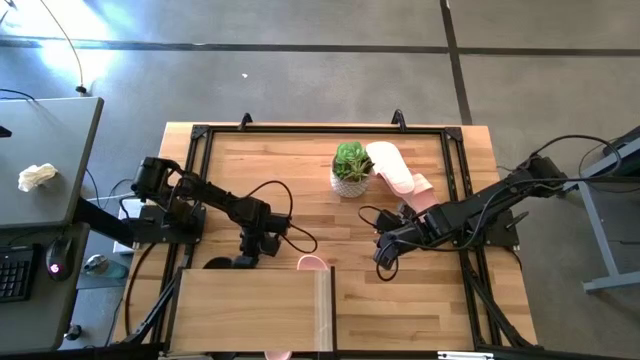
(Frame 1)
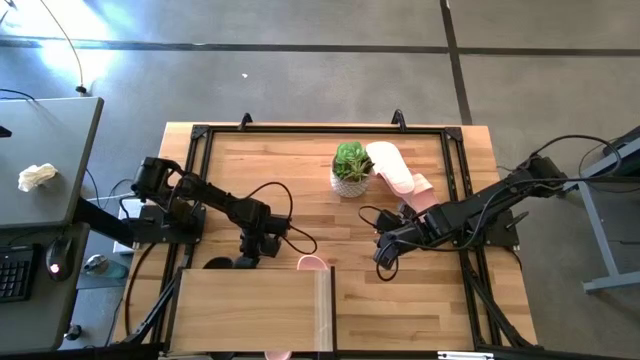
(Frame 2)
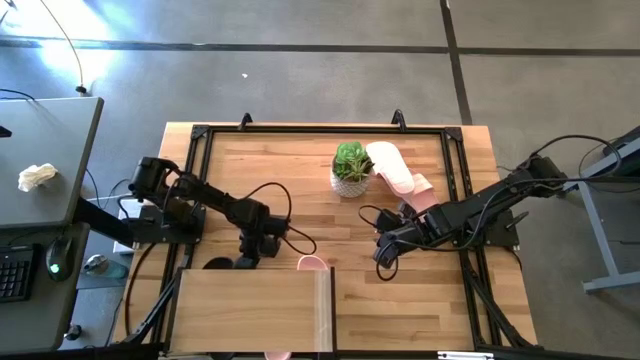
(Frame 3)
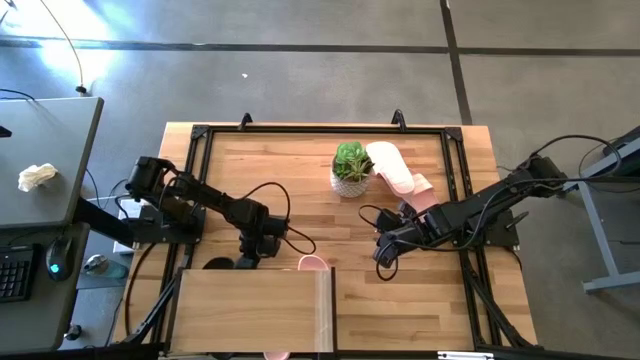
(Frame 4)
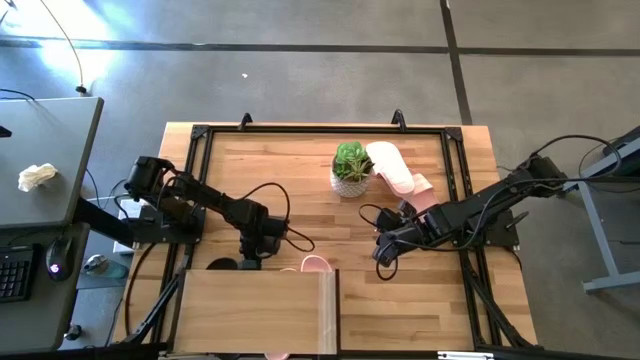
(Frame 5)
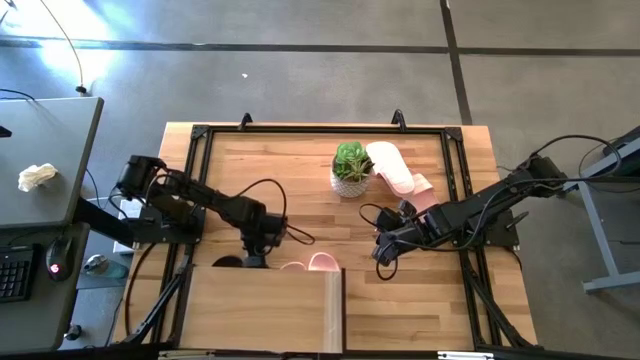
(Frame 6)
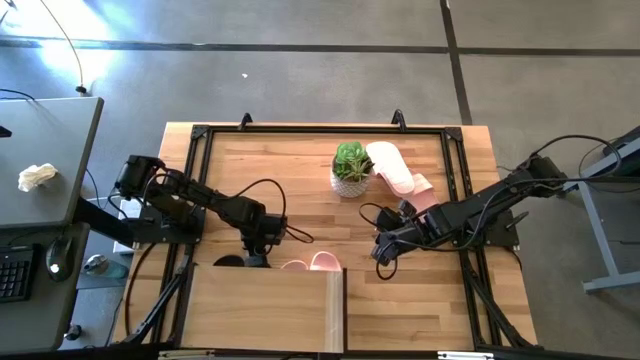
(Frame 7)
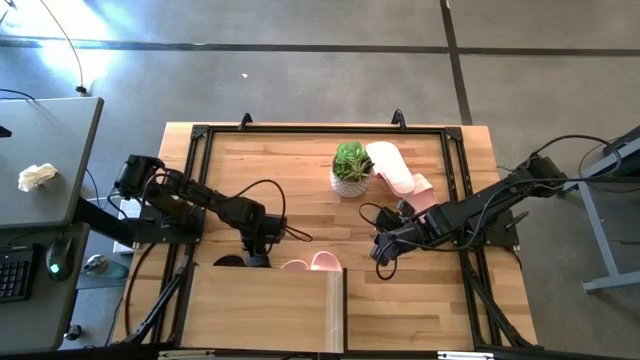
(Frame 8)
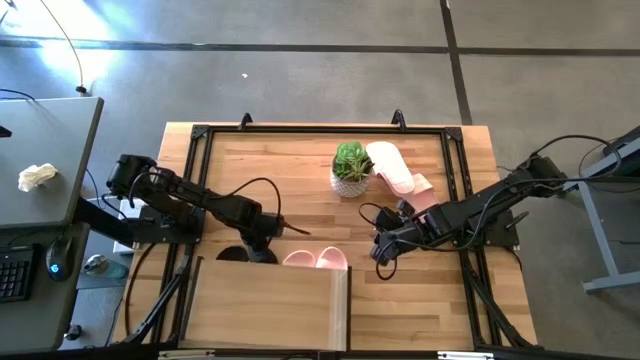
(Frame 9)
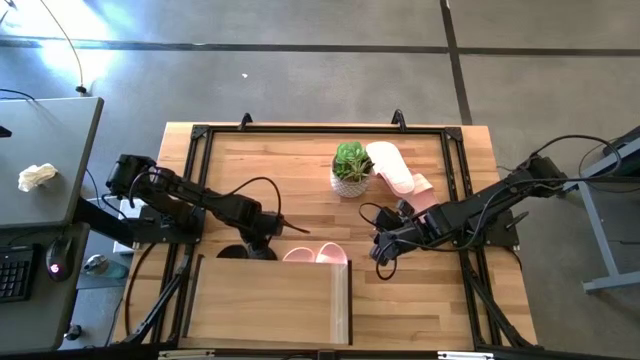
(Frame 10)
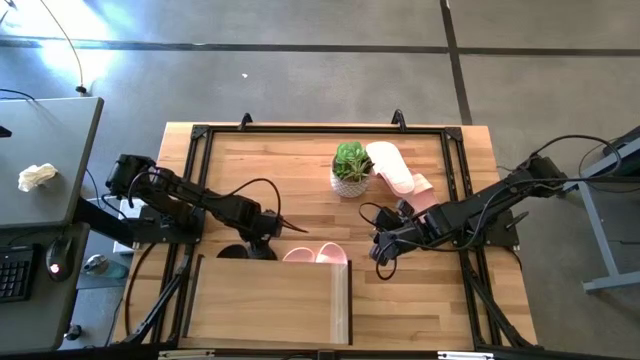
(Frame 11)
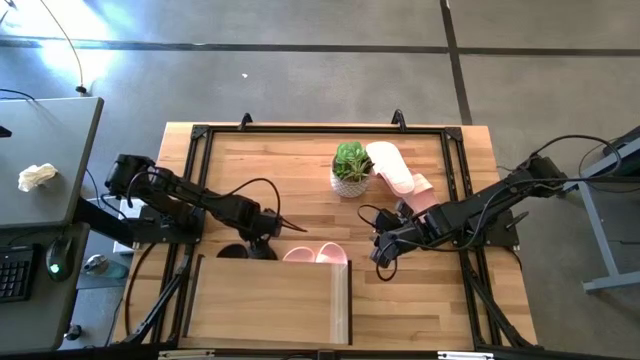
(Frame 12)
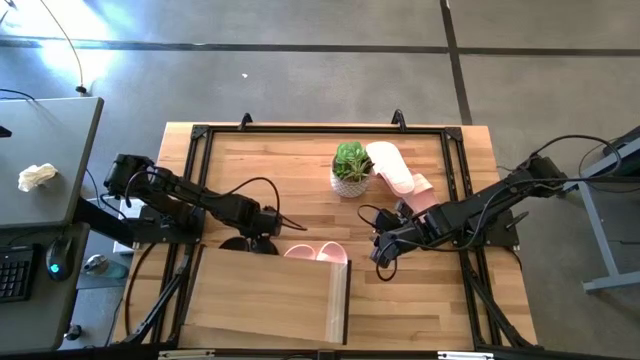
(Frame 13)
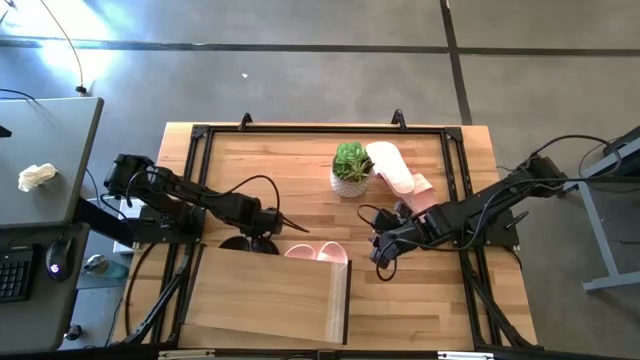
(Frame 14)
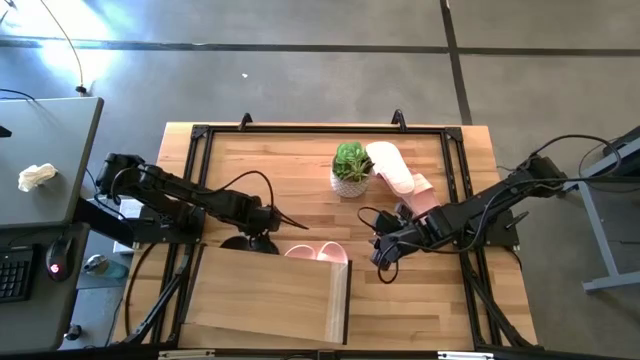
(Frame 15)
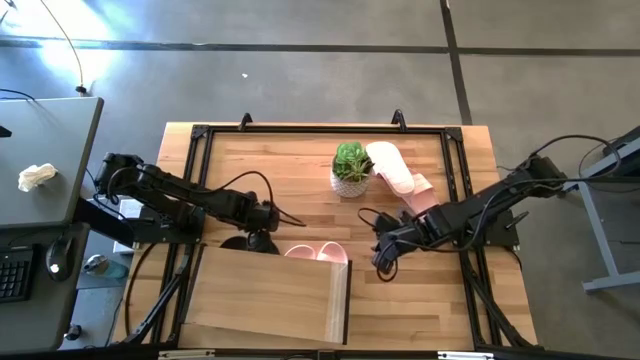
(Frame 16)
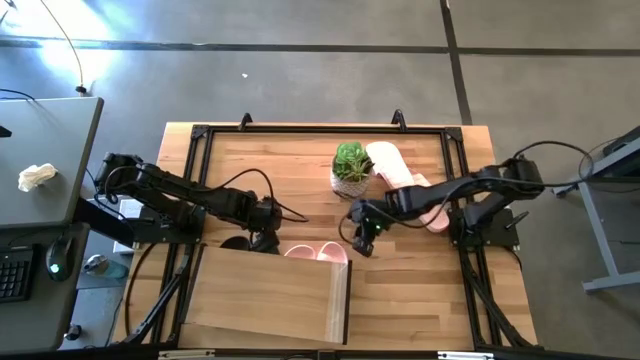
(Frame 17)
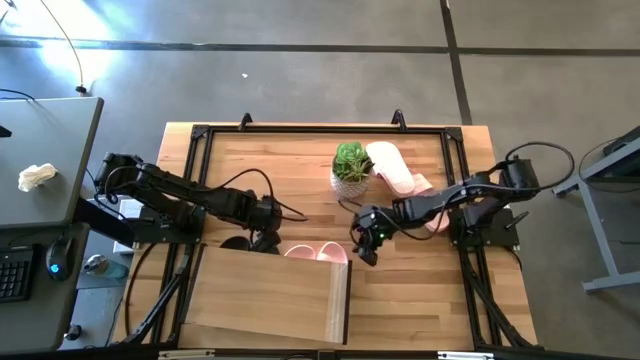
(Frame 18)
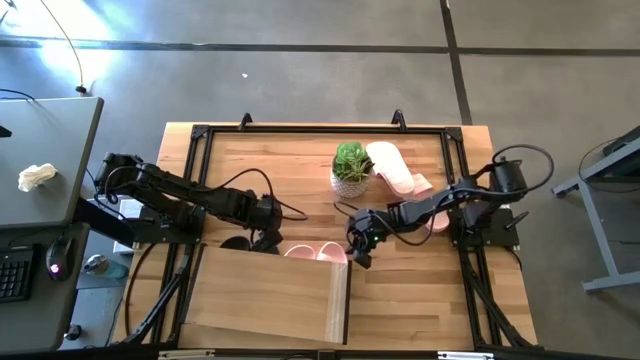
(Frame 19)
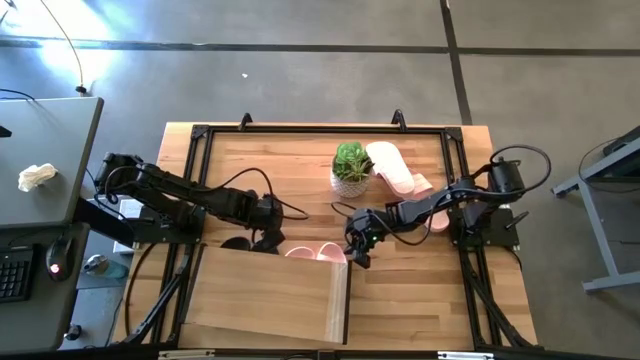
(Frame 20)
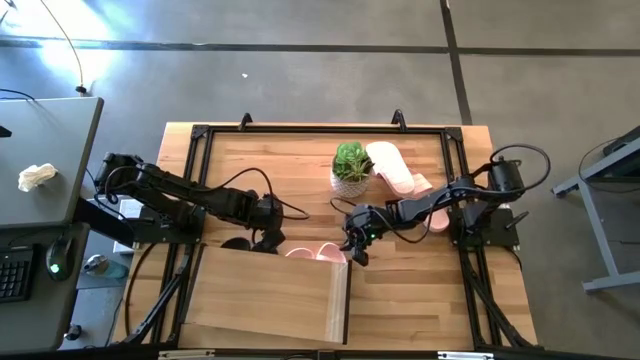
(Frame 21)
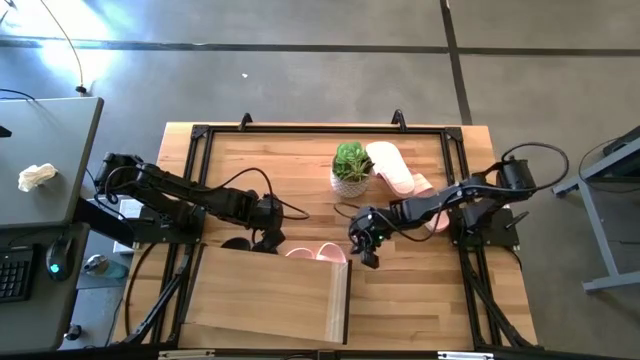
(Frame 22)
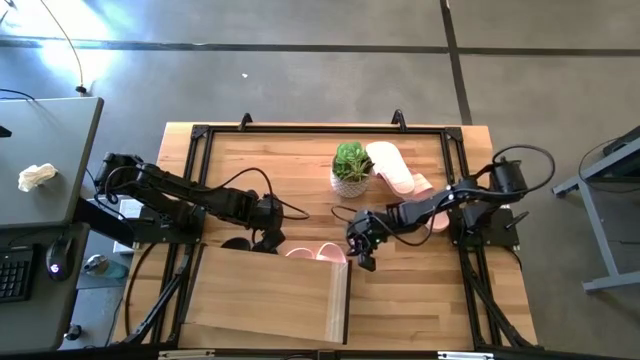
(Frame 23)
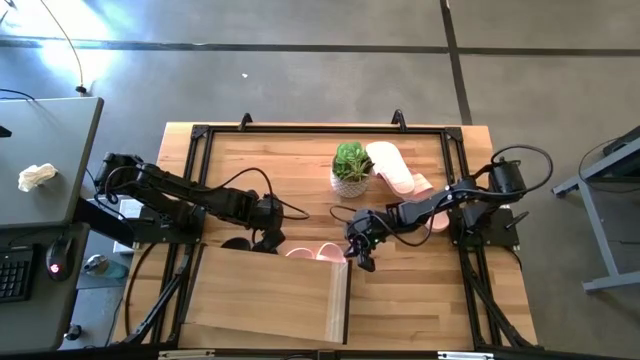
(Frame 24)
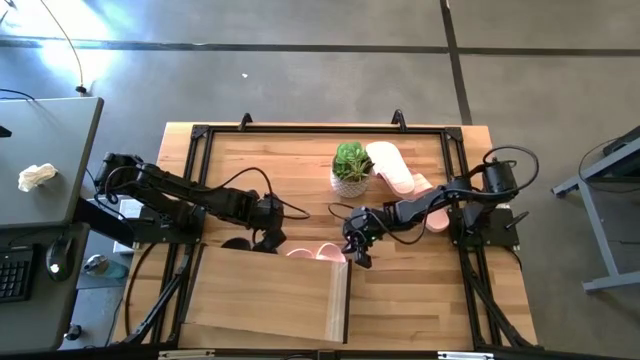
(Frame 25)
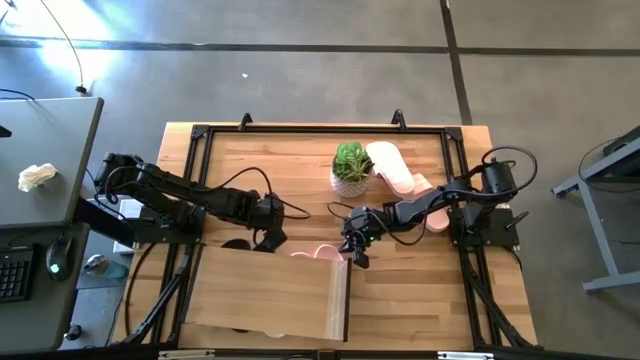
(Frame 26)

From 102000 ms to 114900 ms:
Task: Pick and place slides into the shelf
Adjust the slides under the shelf

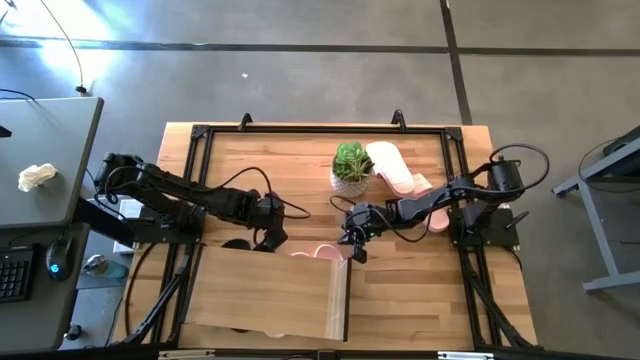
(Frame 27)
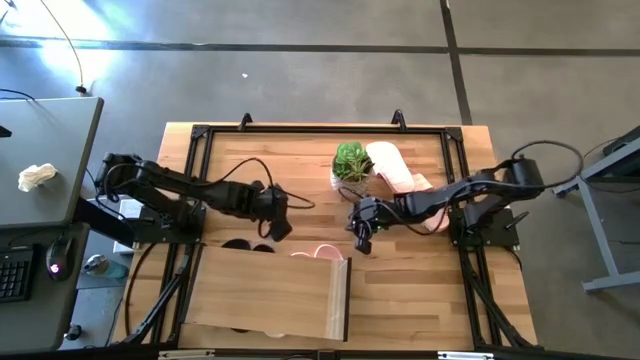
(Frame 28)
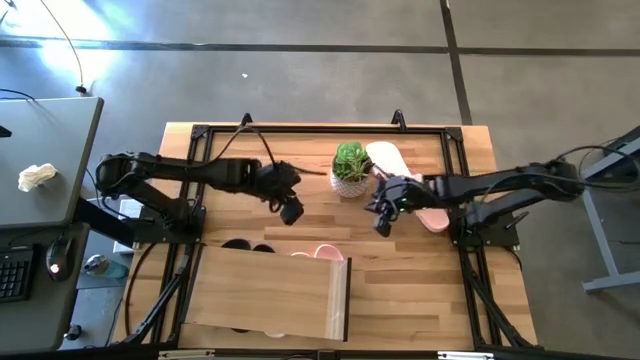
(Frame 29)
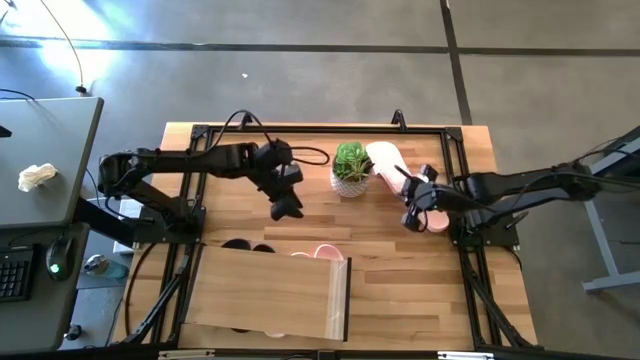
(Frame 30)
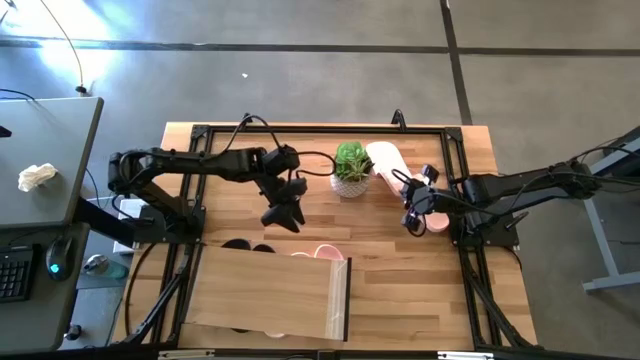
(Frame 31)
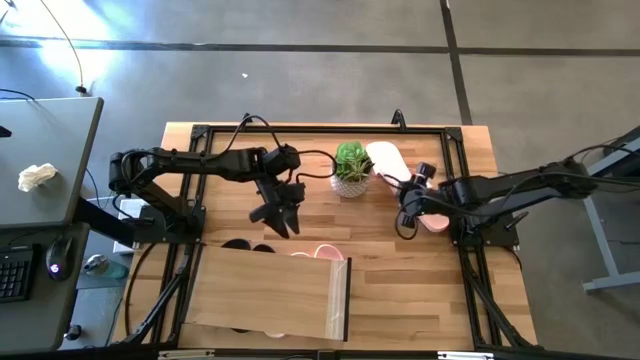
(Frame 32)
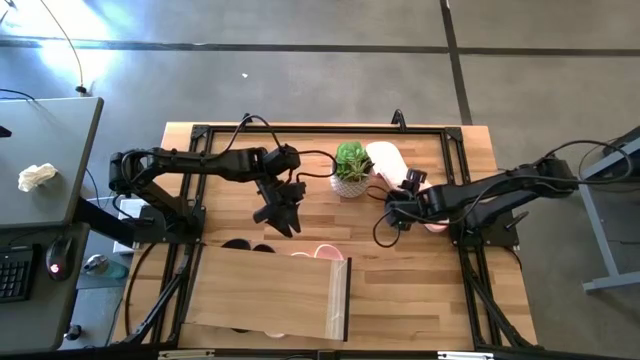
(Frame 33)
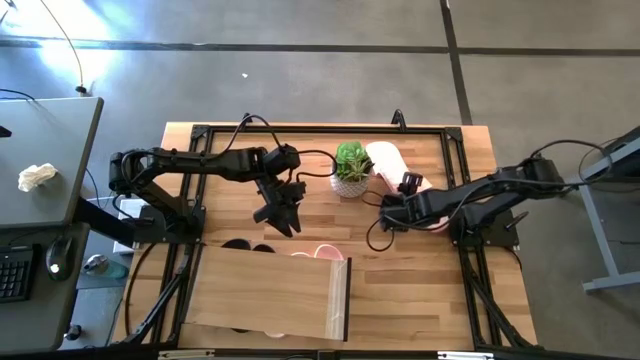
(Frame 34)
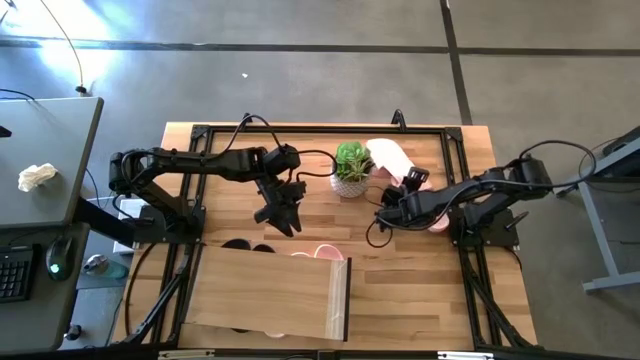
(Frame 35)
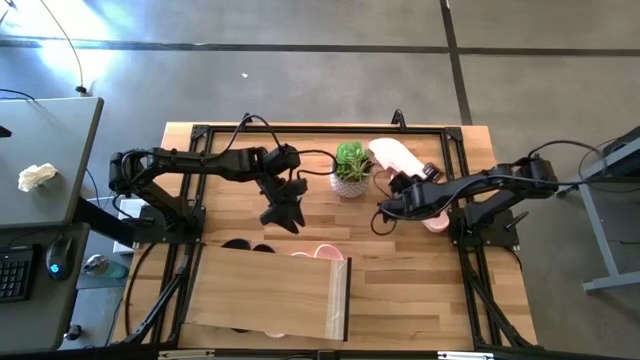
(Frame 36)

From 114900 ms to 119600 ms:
Put the pink slide on the shelf

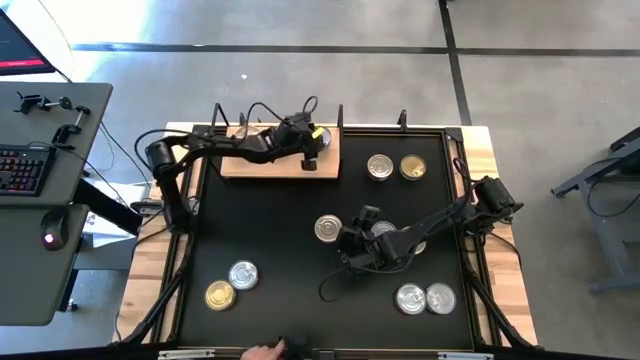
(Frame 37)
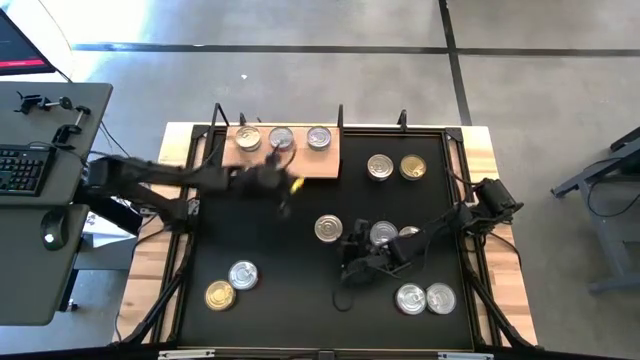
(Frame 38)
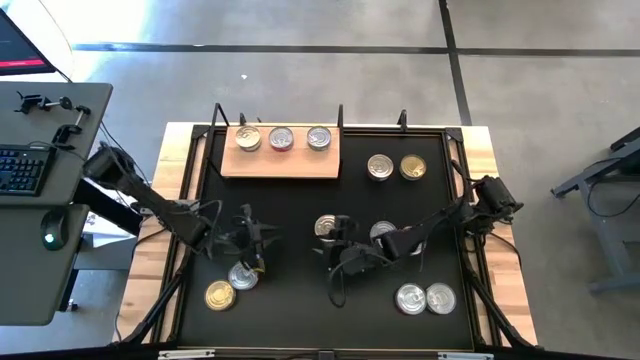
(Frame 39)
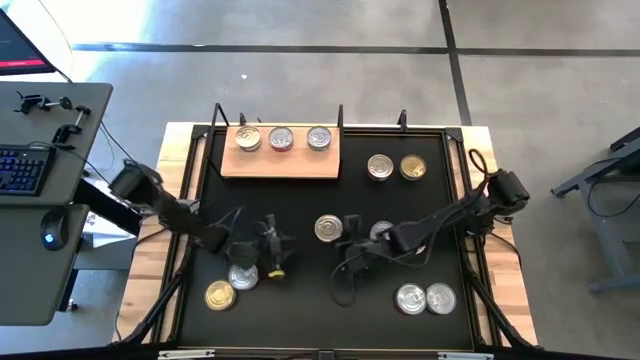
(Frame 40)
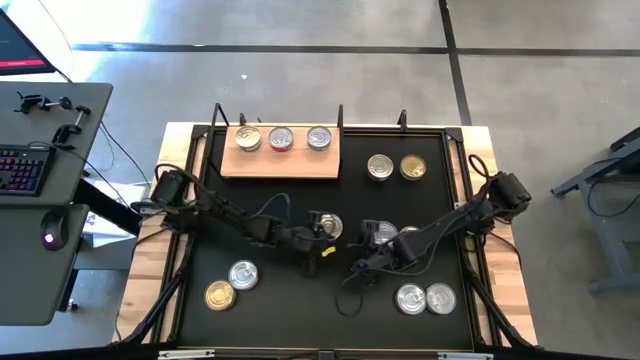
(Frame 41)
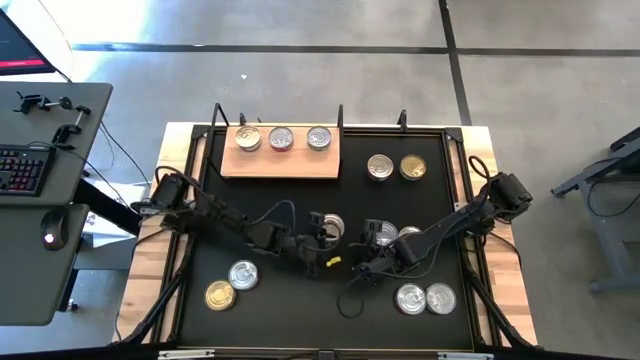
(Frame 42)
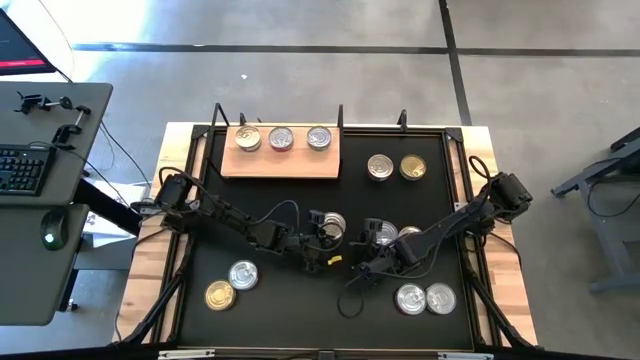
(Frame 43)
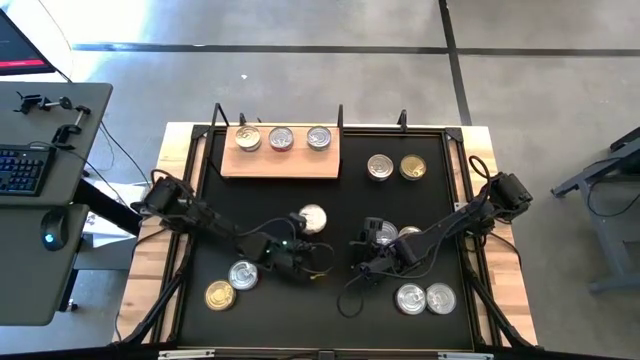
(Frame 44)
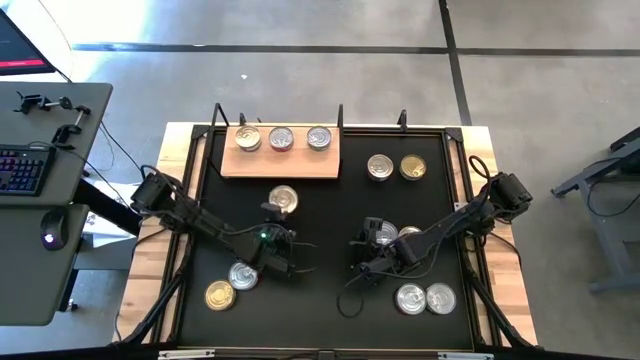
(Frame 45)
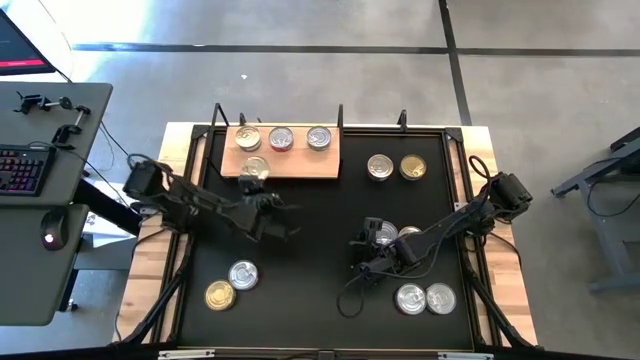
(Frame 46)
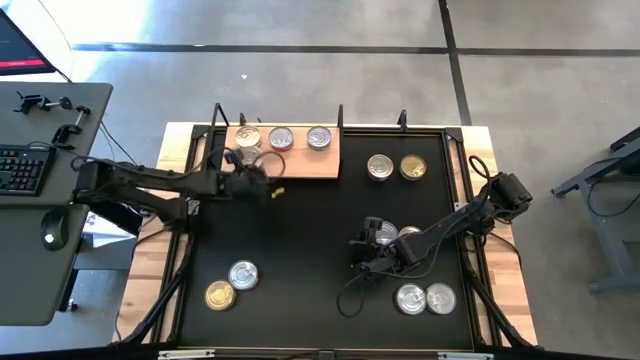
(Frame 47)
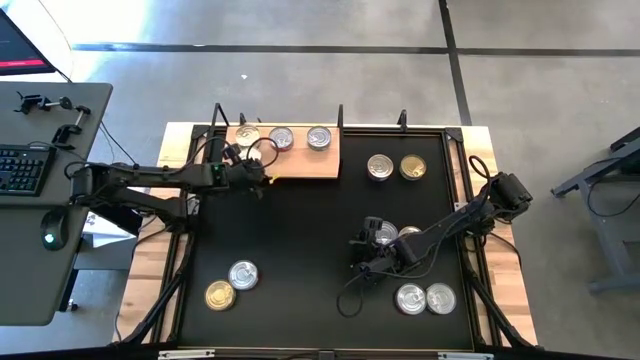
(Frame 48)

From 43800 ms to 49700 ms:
Task: Stack canned seafood by type on shelf
Put the blue tuna can on the shelf
